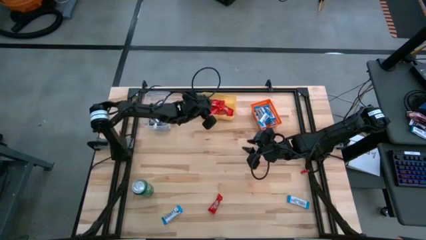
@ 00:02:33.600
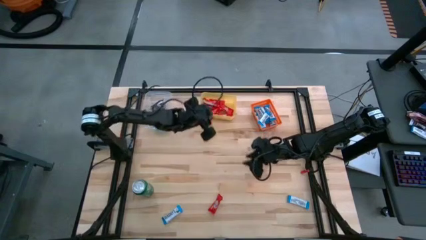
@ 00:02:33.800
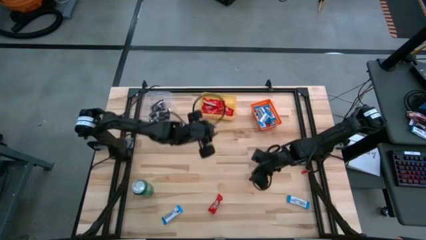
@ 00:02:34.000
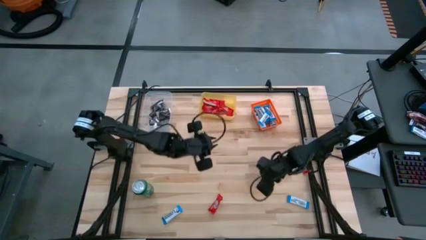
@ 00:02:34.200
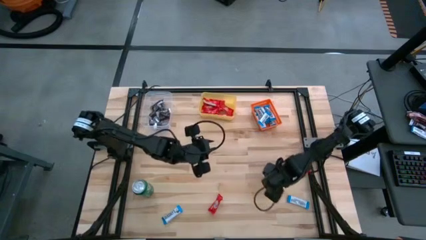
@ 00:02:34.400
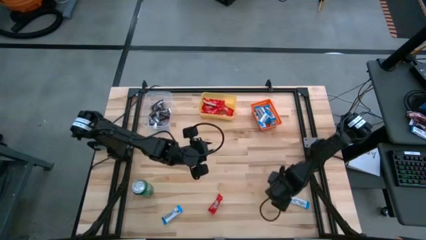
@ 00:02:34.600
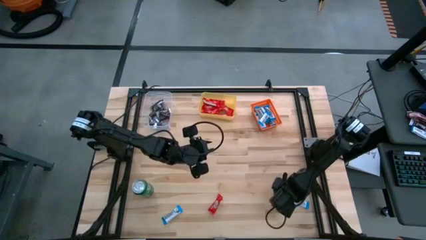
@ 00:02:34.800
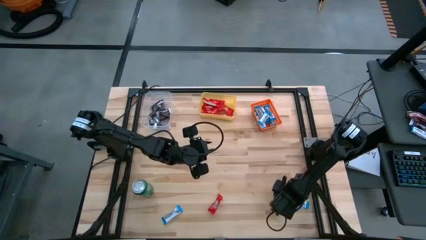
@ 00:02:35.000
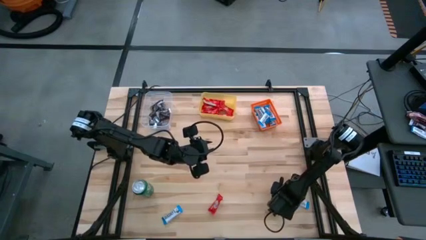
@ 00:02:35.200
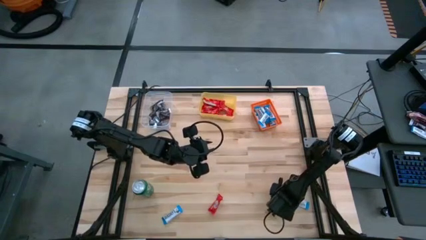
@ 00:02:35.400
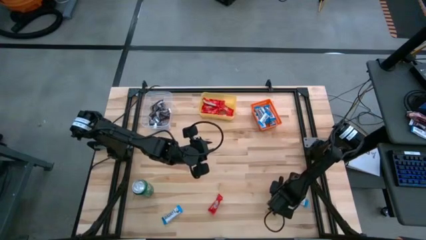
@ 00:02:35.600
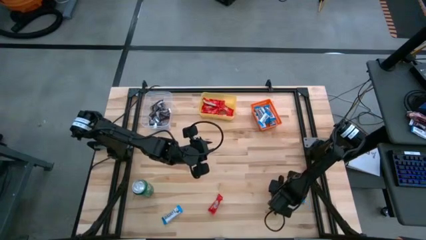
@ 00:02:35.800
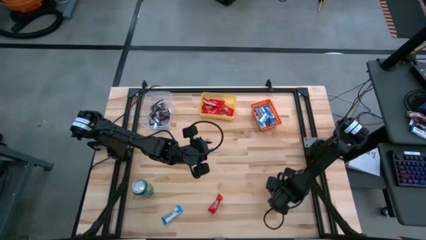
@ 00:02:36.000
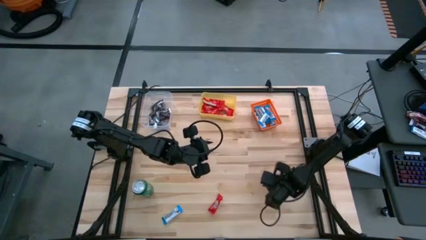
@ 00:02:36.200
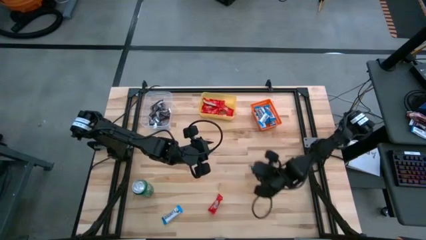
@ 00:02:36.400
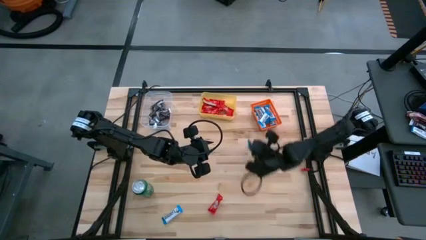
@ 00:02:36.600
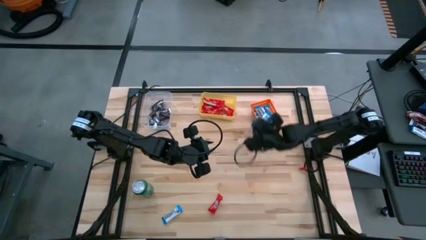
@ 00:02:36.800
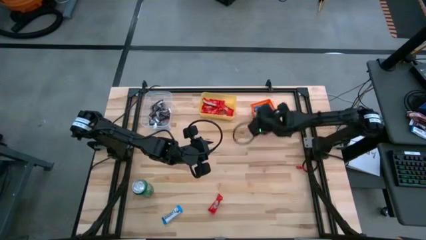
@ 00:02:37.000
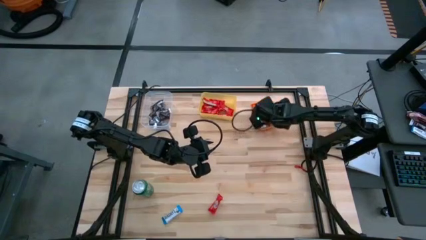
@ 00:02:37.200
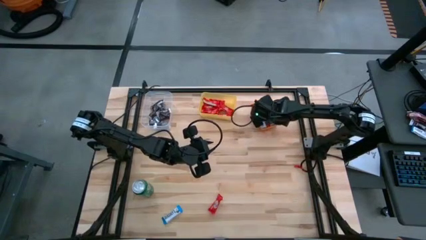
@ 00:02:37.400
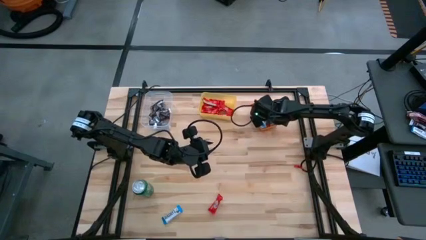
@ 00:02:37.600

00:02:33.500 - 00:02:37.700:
Task: Sort candy
Put the white chocolate bar into the orange bin

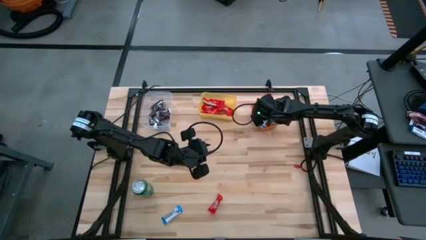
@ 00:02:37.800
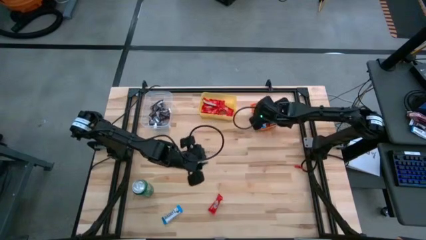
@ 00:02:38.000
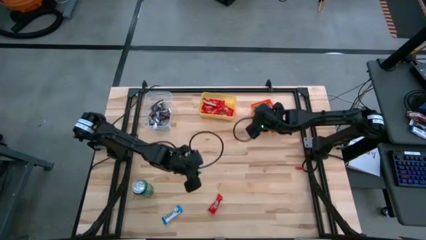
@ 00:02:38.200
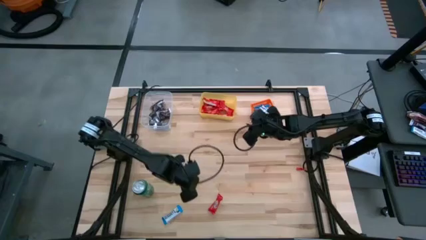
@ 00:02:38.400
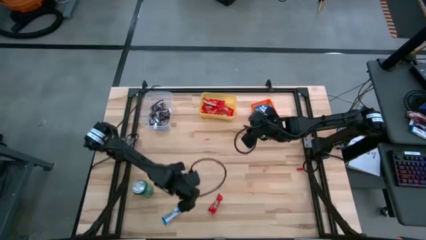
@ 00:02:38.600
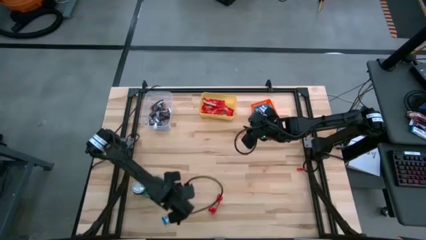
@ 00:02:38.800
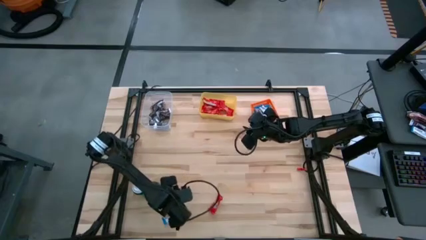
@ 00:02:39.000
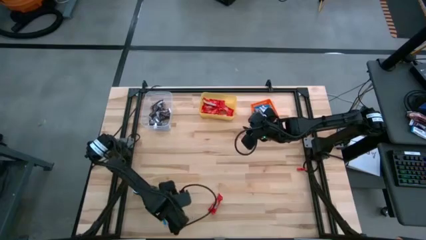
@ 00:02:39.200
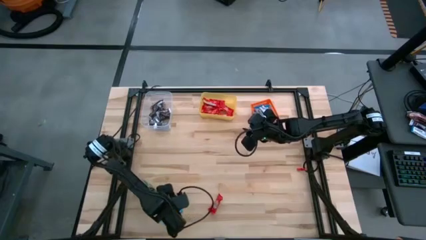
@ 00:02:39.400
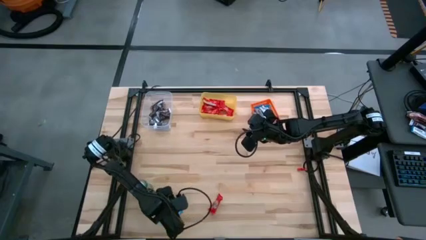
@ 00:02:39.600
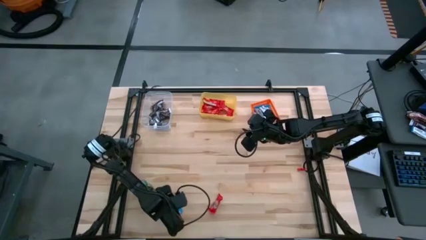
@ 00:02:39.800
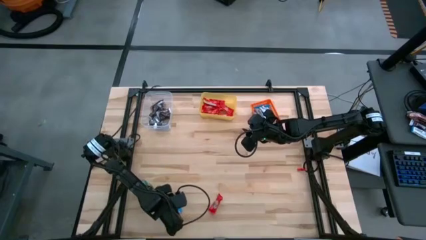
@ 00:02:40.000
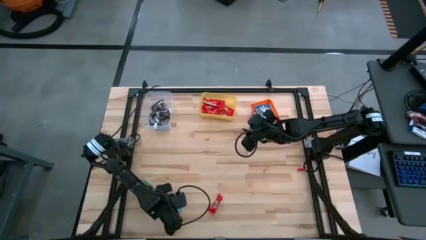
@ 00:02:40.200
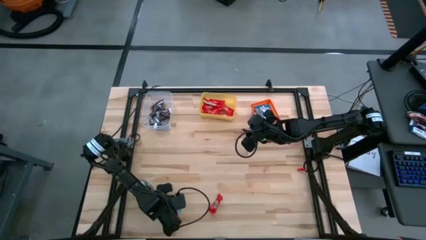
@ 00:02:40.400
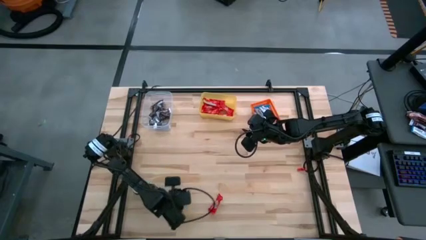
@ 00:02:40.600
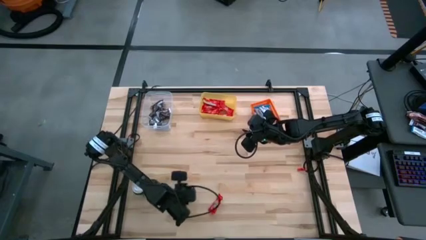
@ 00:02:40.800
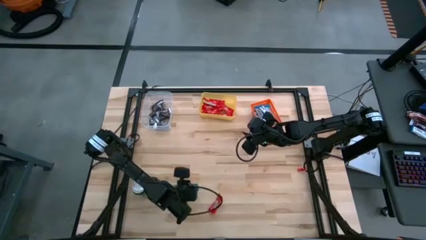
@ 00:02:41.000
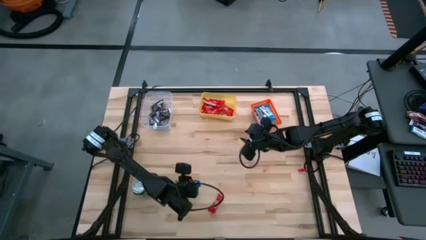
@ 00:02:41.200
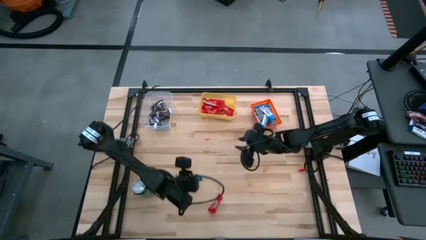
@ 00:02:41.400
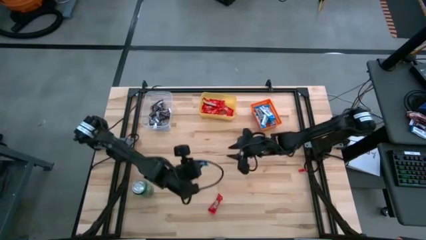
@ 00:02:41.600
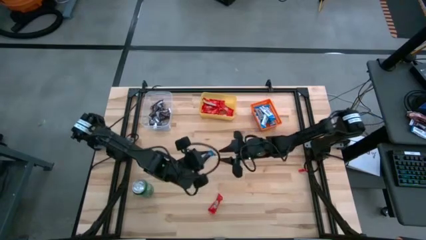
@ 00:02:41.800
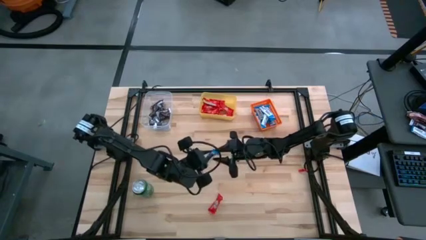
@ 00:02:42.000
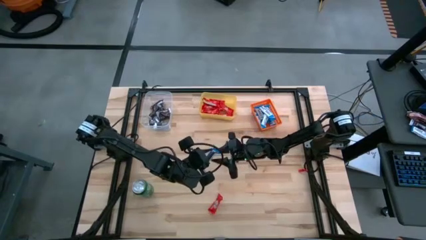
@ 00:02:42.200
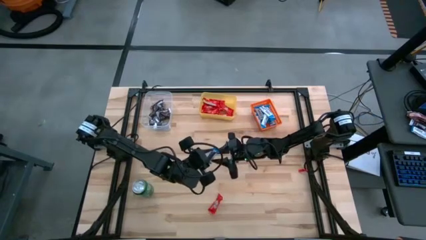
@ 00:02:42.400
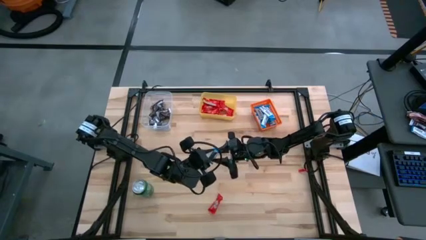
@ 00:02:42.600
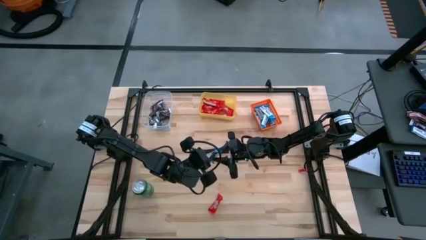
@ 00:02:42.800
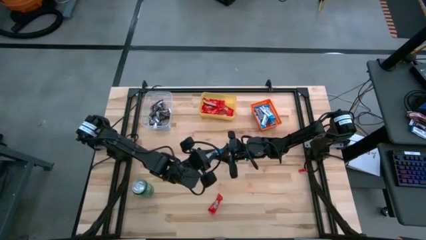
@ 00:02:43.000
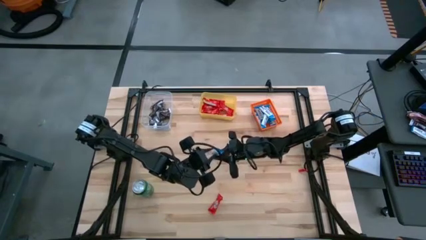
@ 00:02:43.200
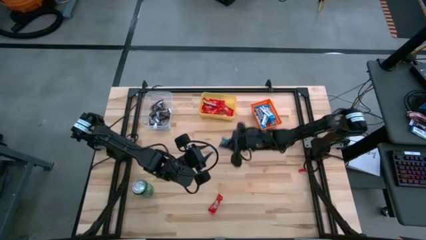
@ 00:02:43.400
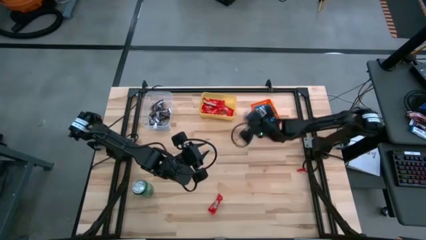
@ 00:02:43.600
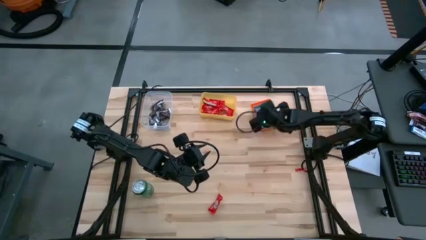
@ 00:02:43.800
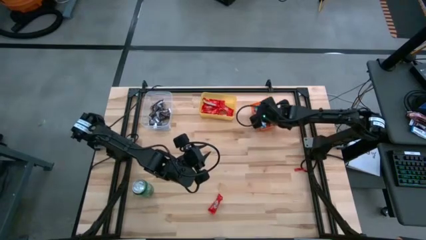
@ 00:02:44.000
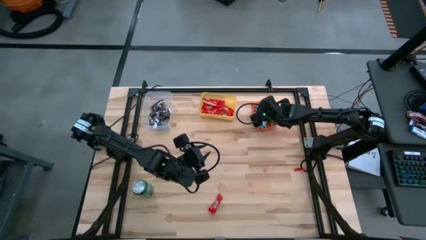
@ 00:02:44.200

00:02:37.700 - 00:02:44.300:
Put the white chocolate bar into the orange bin

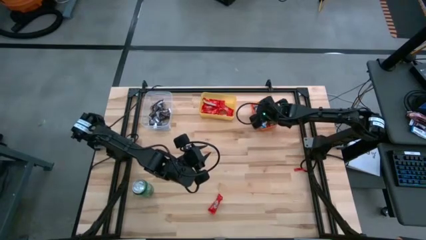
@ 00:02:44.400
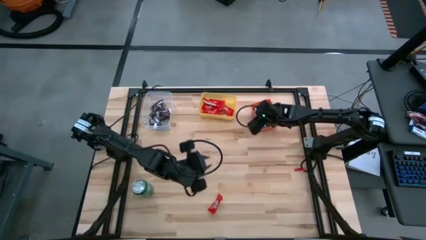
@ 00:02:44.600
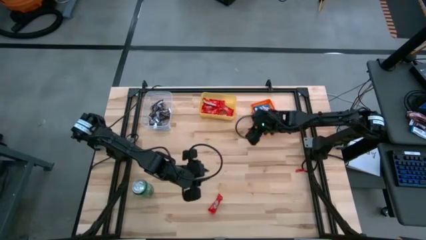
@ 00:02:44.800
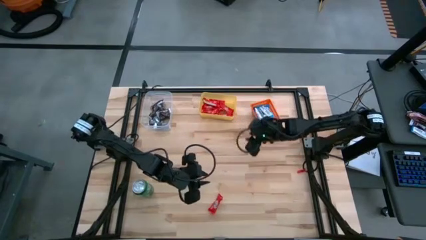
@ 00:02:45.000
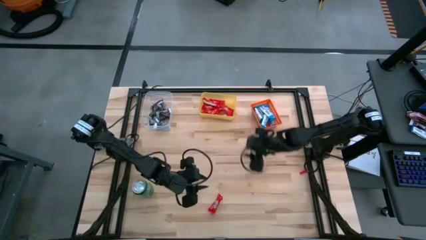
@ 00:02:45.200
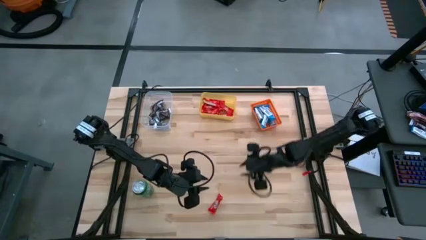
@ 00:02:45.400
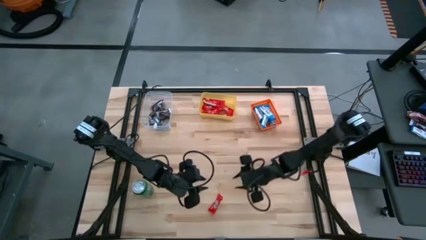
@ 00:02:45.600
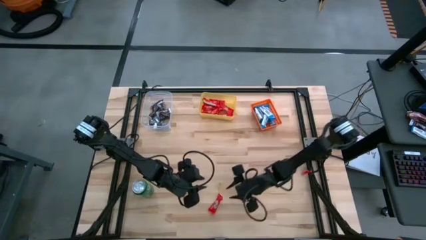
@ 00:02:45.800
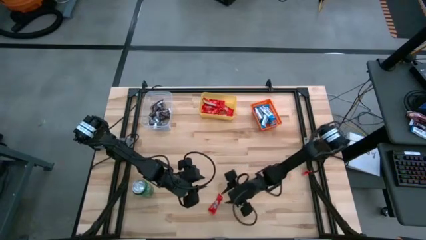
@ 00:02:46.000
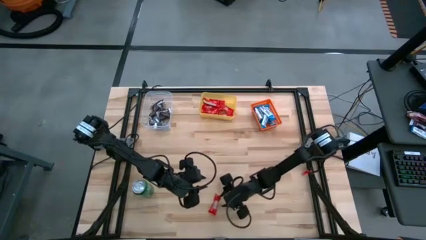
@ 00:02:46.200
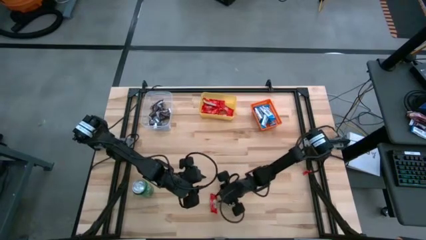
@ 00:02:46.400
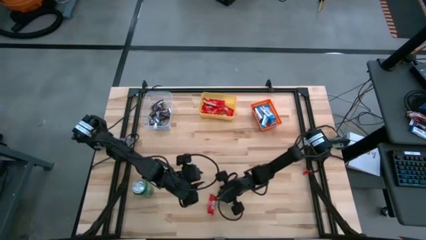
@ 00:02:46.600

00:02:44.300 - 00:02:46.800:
Put the orange chocolate bar into the yellow bin

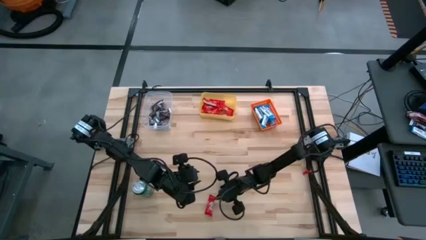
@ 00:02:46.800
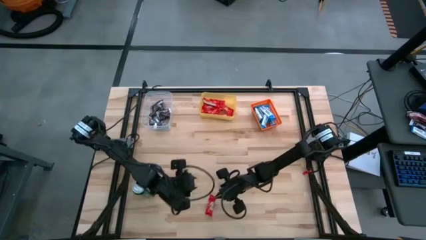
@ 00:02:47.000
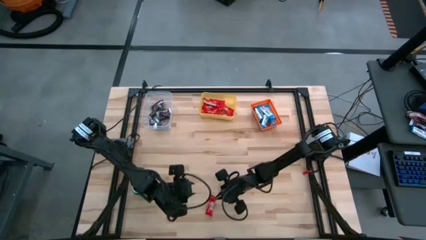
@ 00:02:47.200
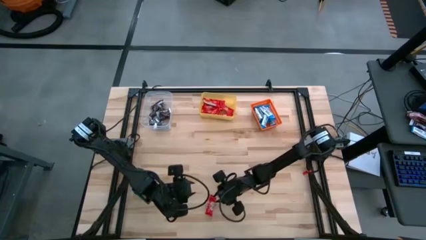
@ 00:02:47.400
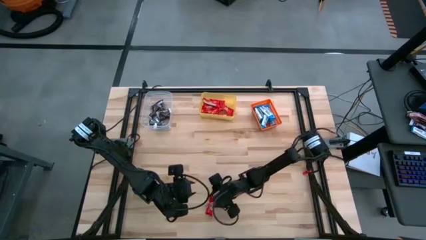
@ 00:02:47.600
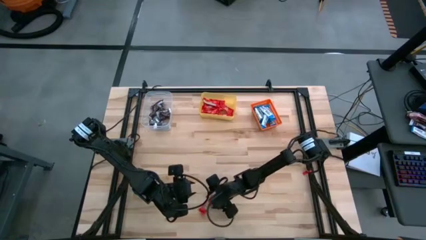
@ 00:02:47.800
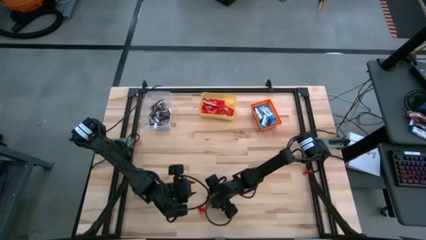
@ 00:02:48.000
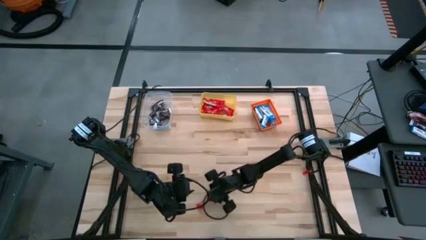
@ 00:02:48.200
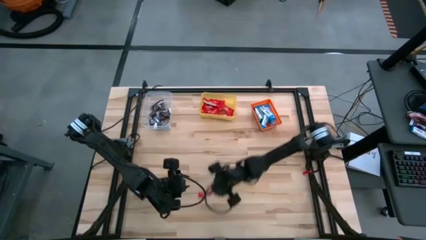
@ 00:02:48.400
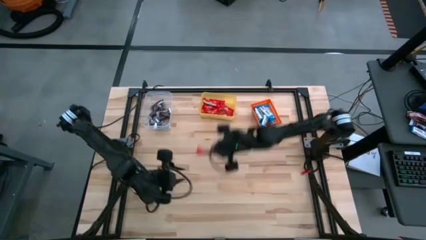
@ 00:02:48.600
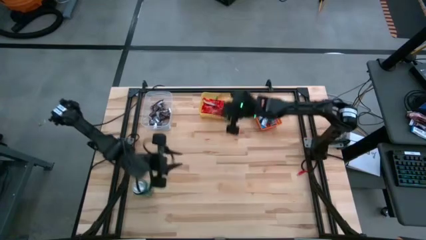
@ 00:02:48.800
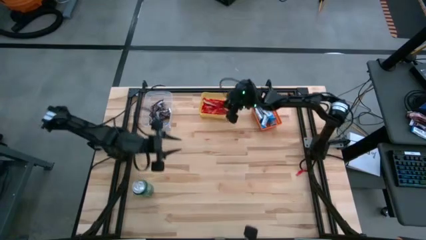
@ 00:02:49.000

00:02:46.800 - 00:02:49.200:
Put the orange chocolate bar into the yellow bin
